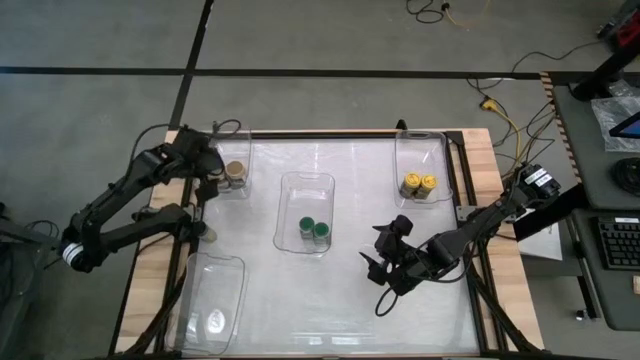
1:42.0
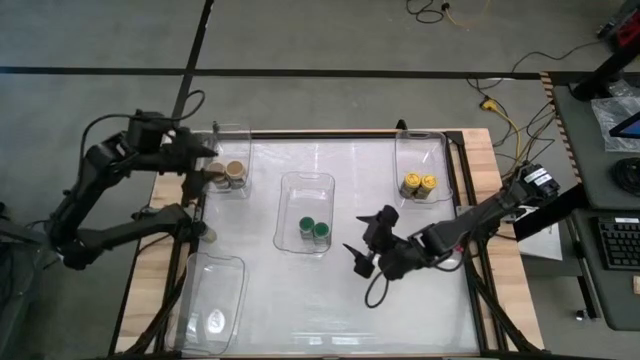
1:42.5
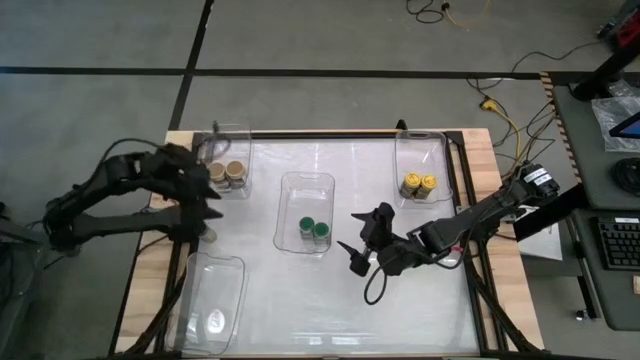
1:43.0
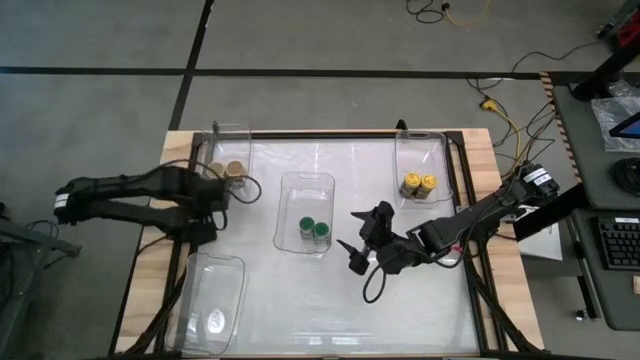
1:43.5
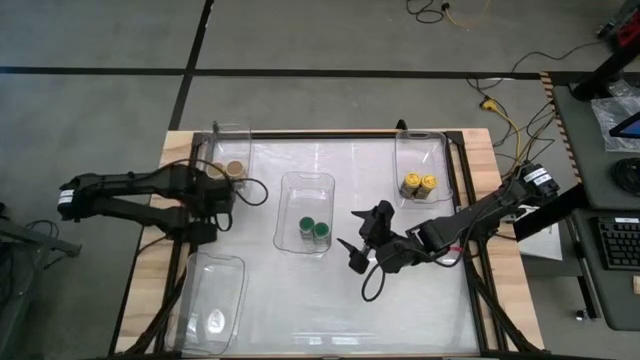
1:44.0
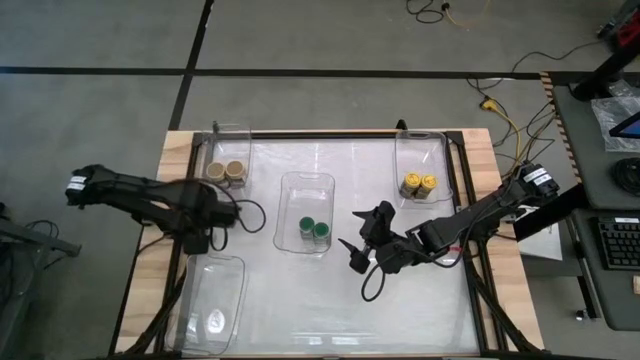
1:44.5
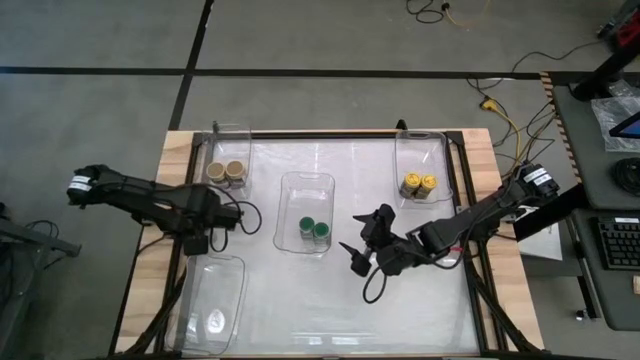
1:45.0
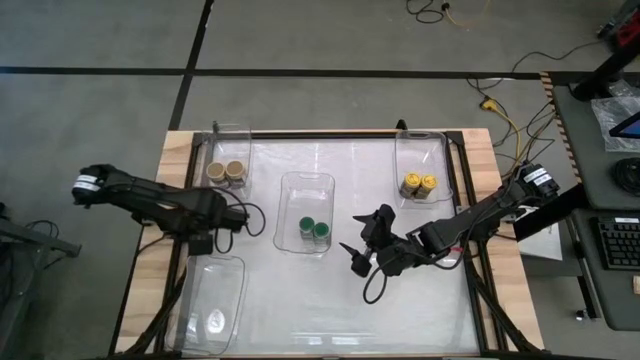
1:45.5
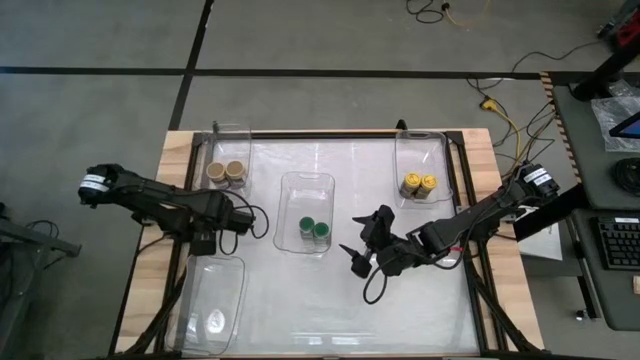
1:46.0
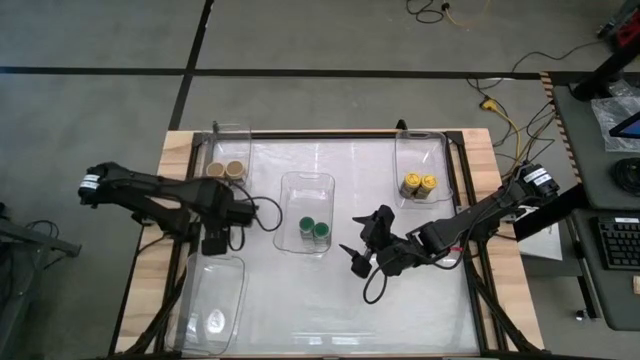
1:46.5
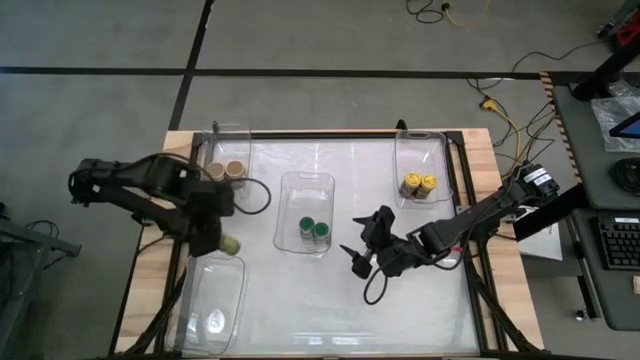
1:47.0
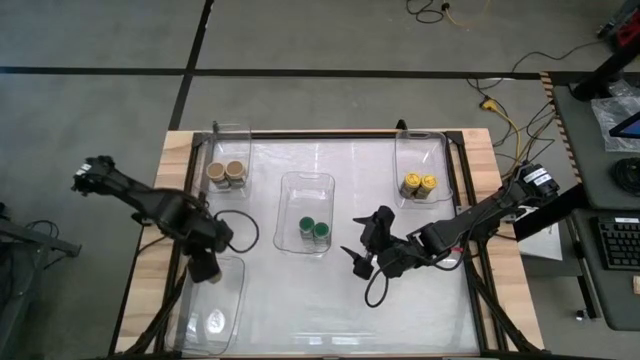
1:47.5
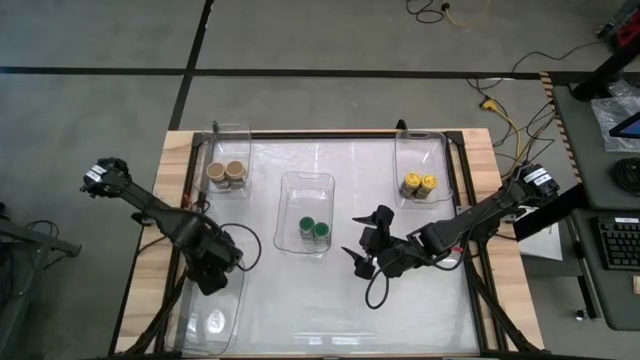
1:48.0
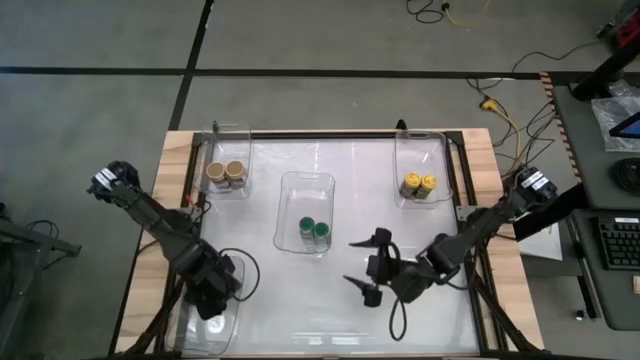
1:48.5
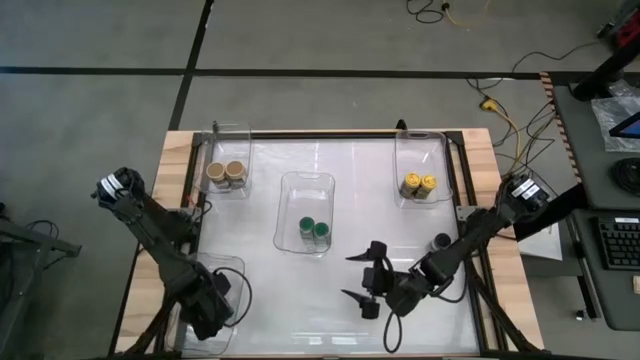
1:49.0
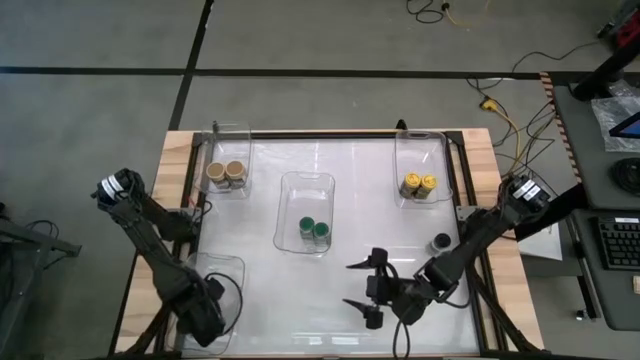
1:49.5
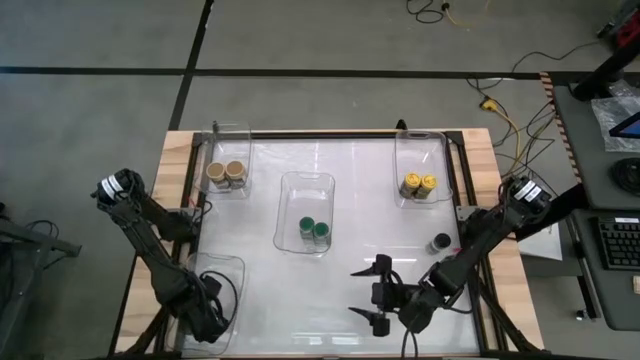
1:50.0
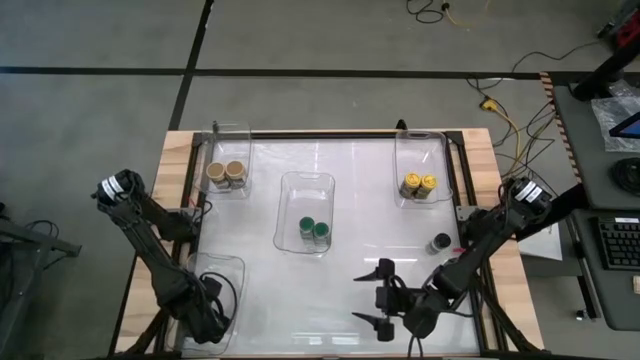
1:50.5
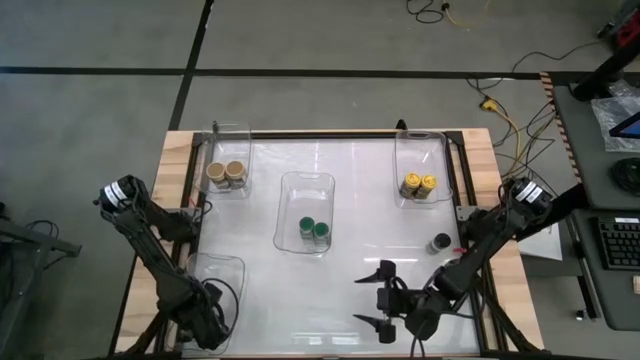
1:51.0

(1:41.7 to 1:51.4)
Task: Sort spices by type
Put the left black seasoning bottle into the bottom left transparent bin

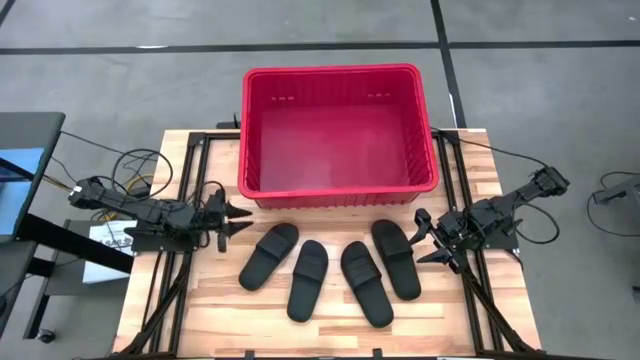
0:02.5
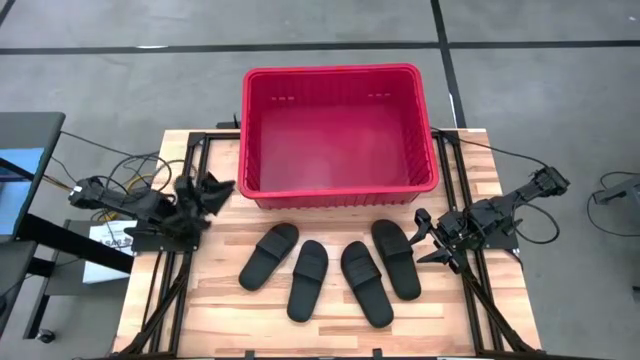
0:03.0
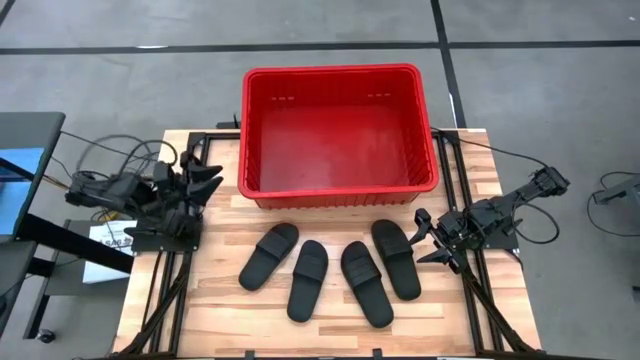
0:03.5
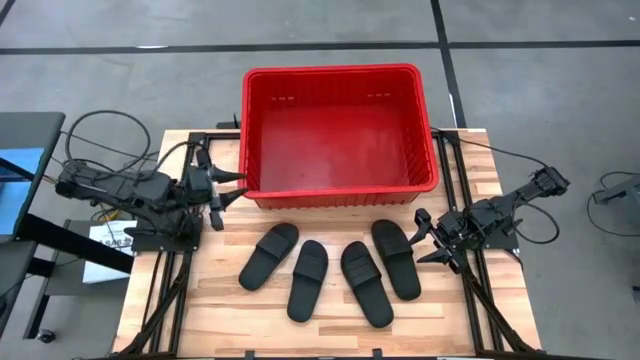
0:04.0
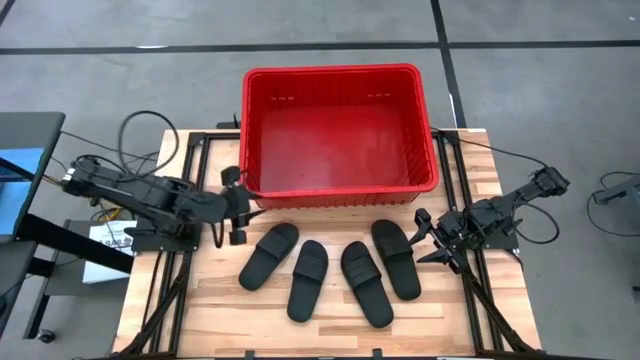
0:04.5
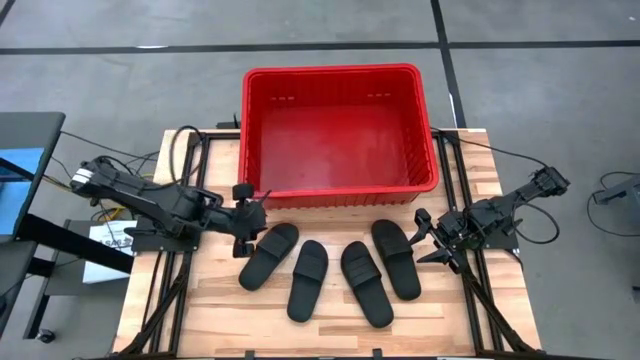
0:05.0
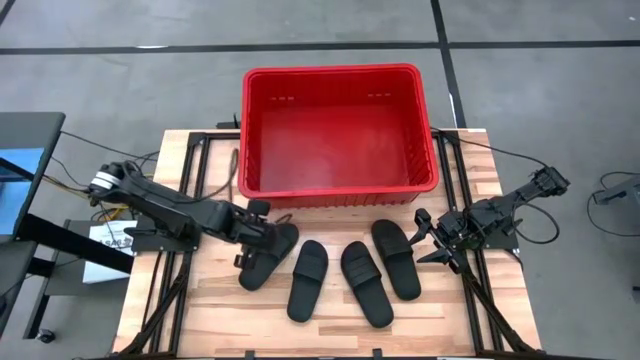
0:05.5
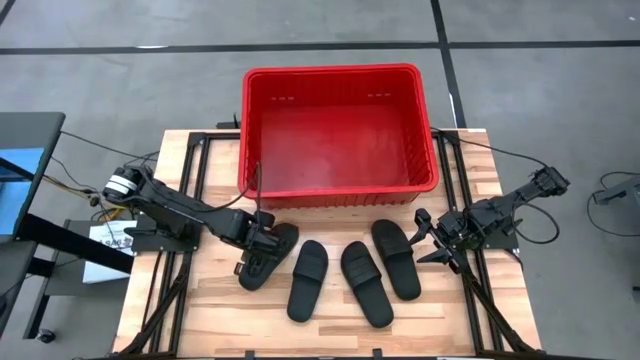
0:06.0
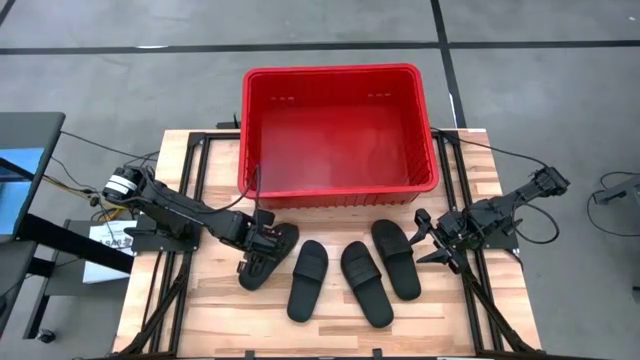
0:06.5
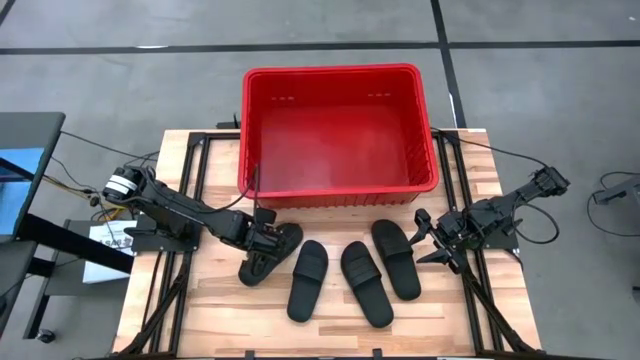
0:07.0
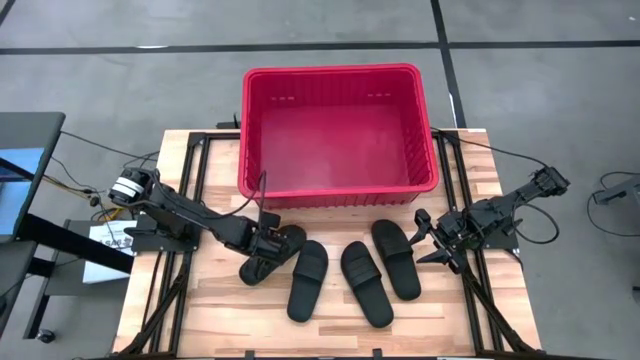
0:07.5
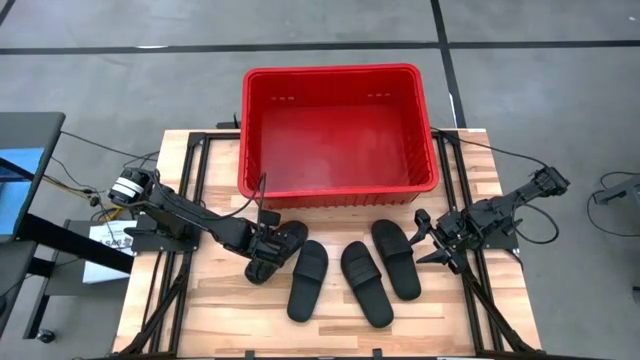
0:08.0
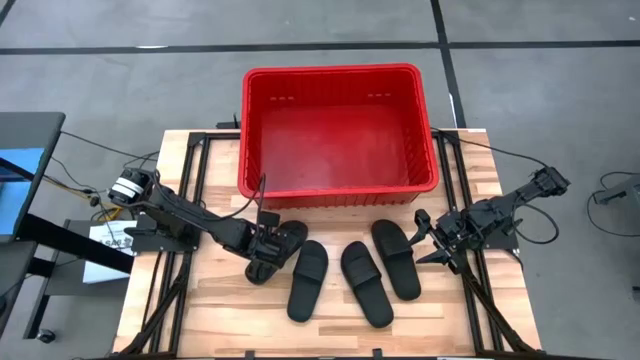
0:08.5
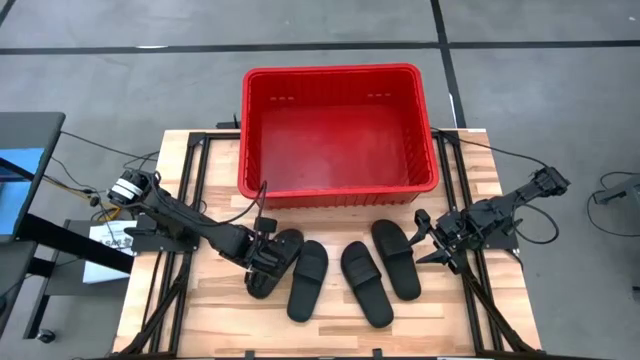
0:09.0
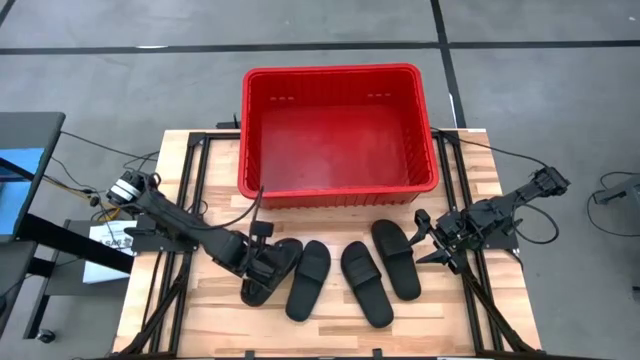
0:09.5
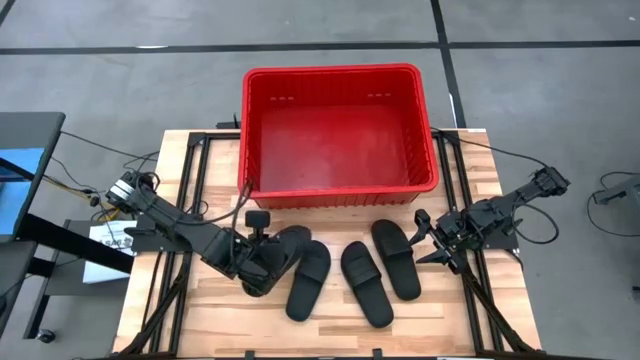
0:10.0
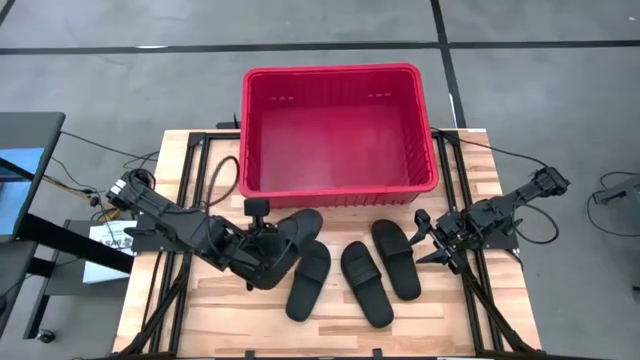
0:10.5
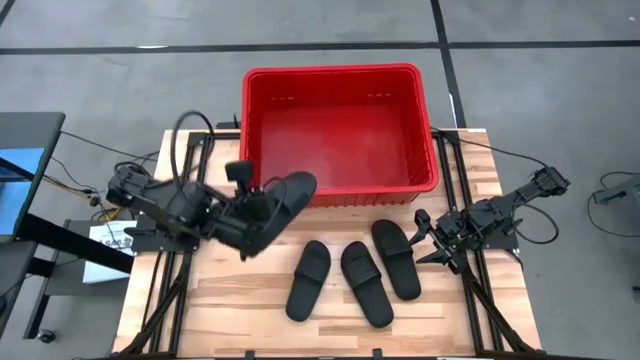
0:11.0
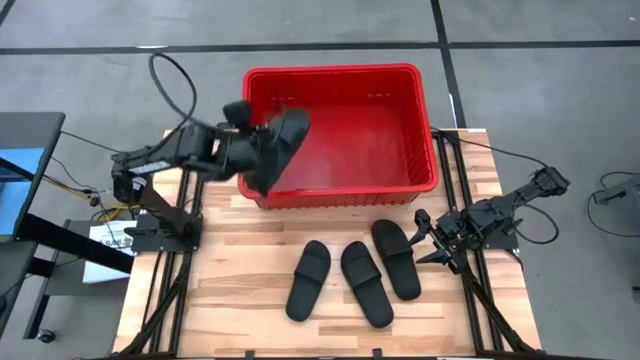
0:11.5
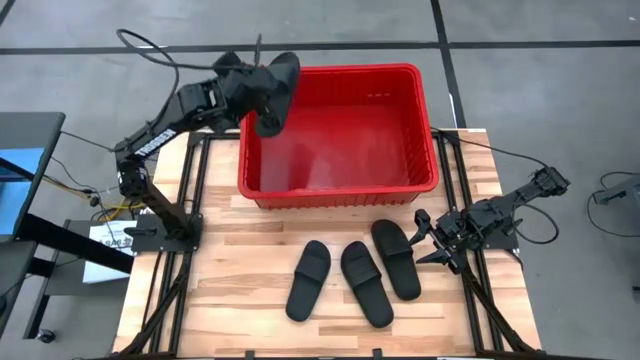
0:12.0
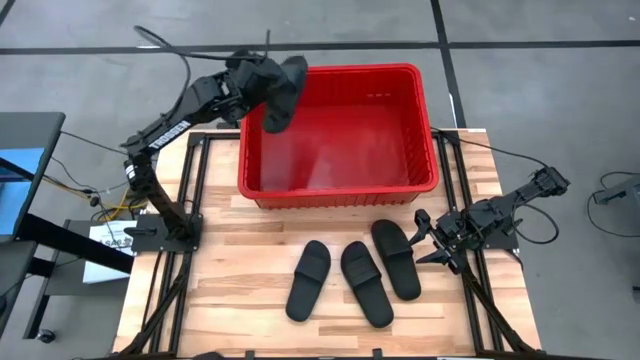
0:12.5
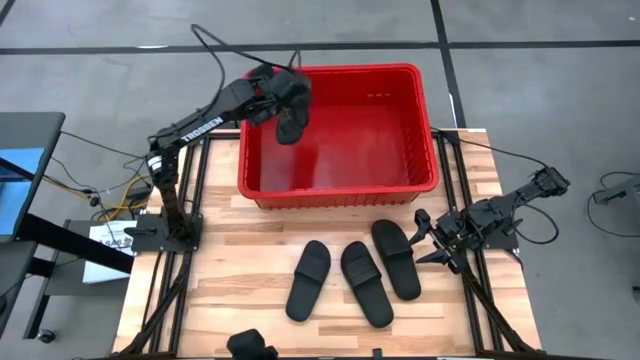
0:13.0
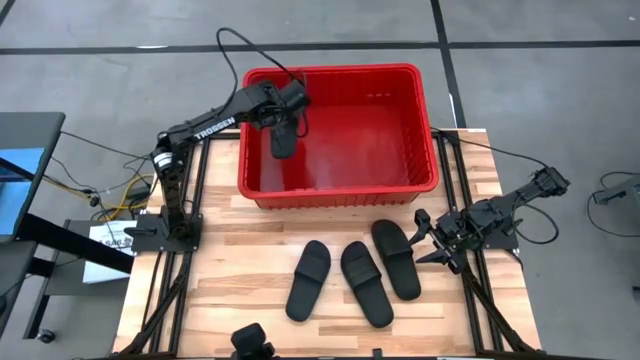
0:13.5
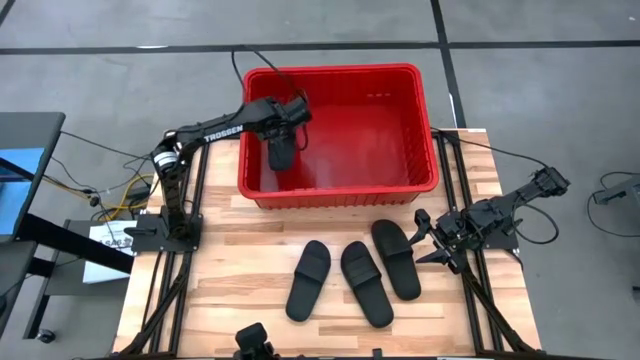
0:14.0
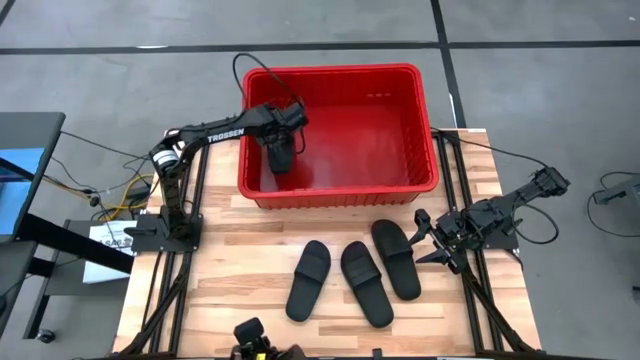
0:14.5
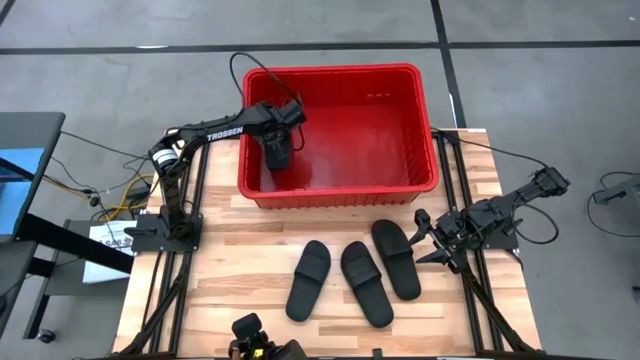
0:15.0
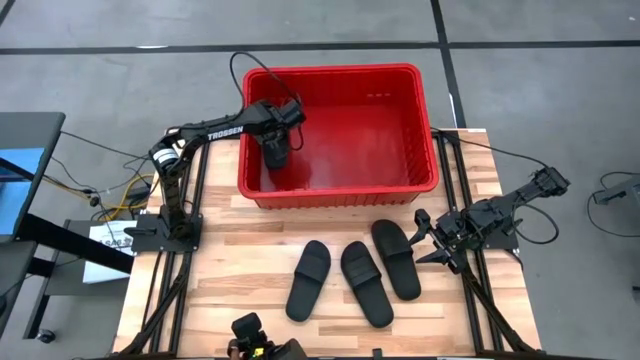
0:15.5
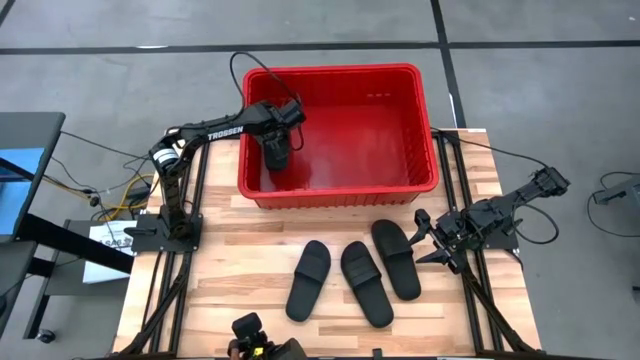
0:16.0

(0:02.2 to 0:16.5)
Task: Pick and place slides into bin
Put the black slipper into the red bin
